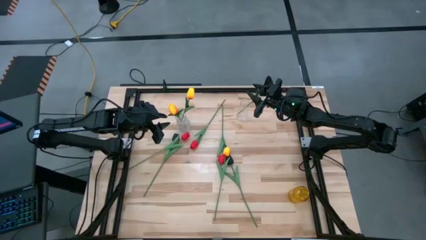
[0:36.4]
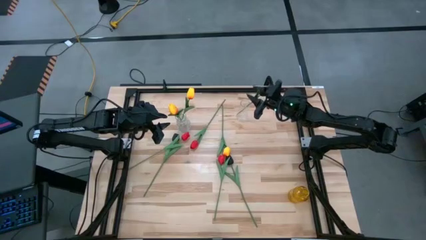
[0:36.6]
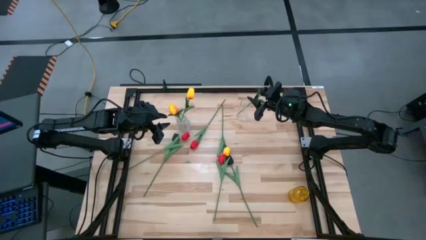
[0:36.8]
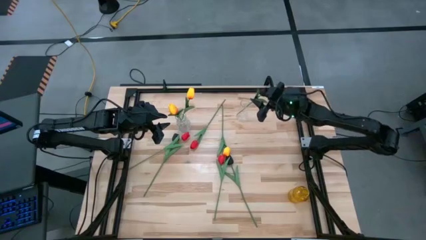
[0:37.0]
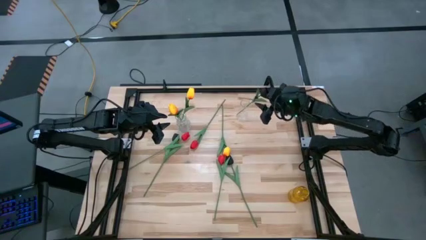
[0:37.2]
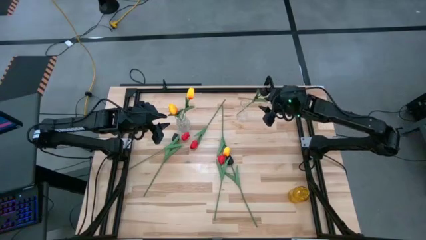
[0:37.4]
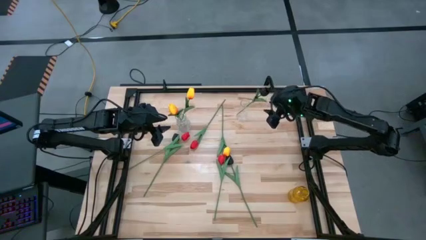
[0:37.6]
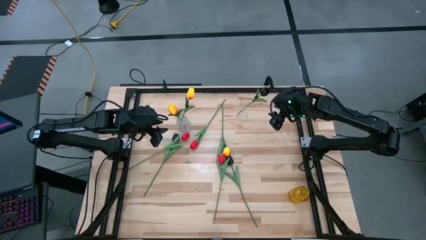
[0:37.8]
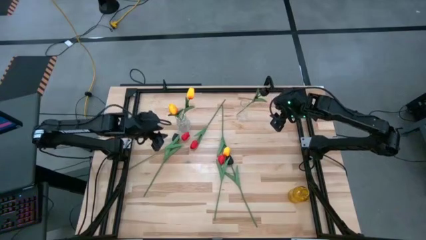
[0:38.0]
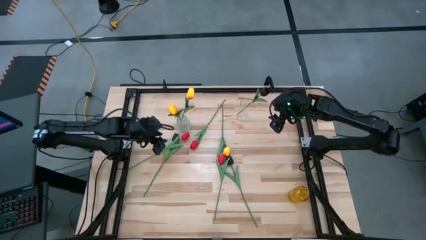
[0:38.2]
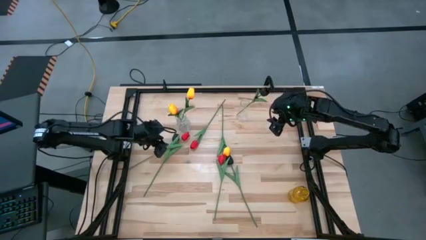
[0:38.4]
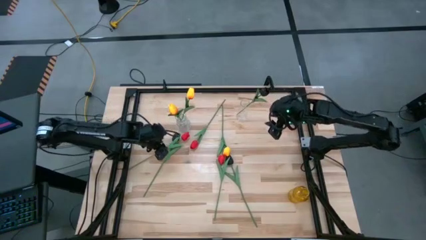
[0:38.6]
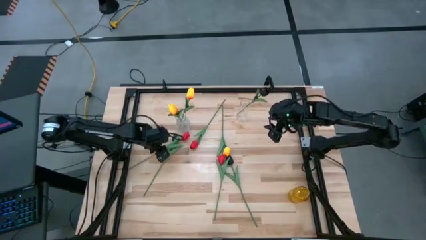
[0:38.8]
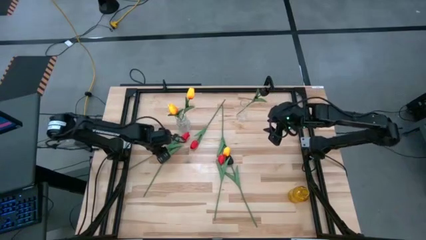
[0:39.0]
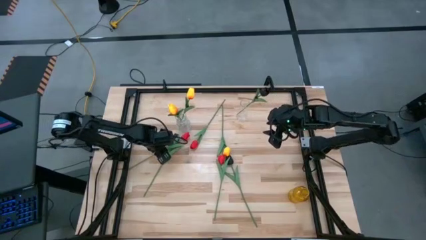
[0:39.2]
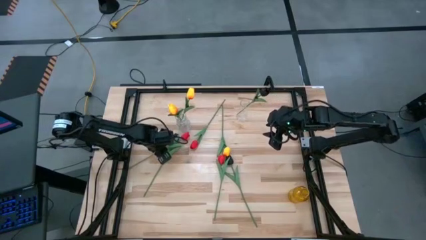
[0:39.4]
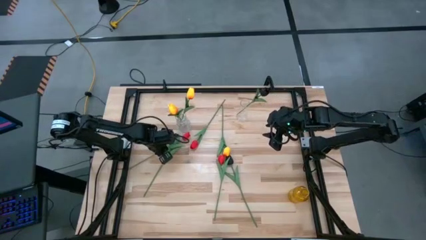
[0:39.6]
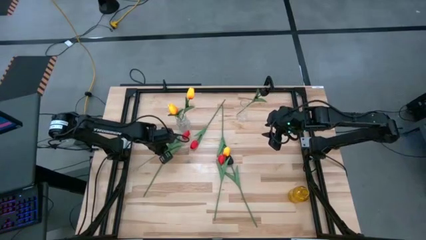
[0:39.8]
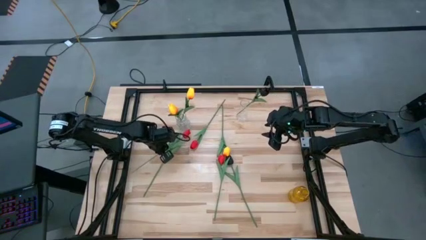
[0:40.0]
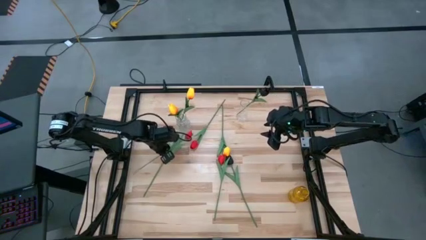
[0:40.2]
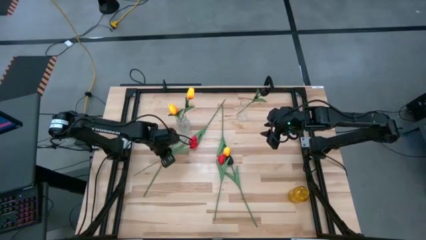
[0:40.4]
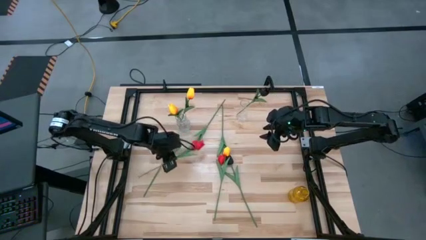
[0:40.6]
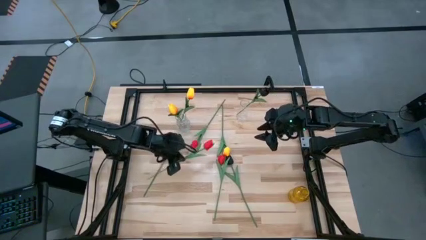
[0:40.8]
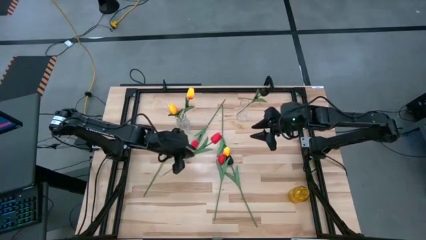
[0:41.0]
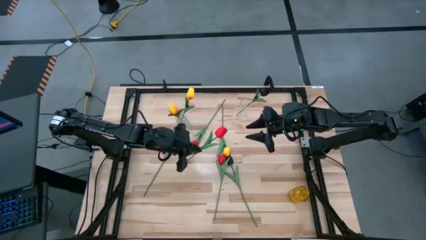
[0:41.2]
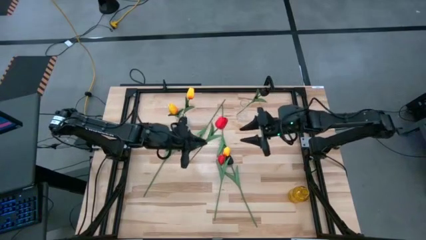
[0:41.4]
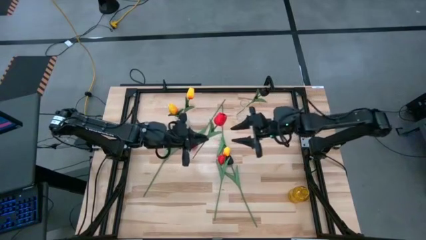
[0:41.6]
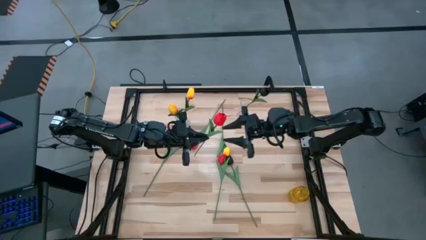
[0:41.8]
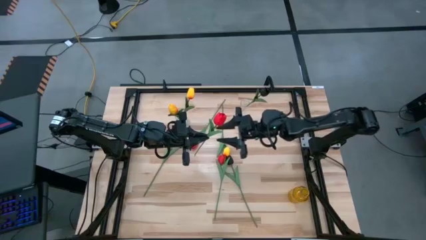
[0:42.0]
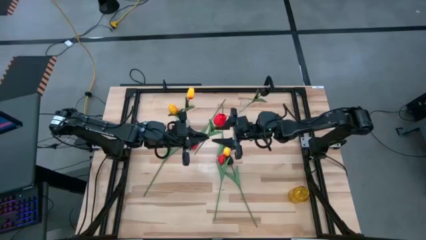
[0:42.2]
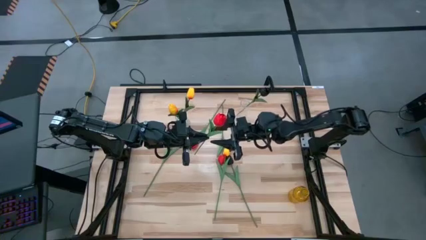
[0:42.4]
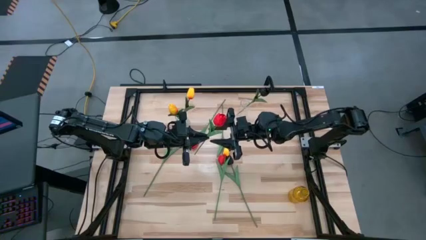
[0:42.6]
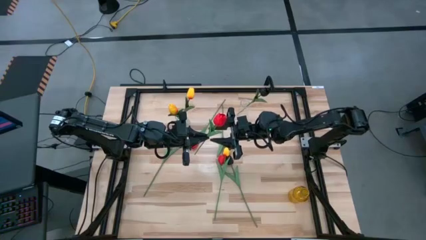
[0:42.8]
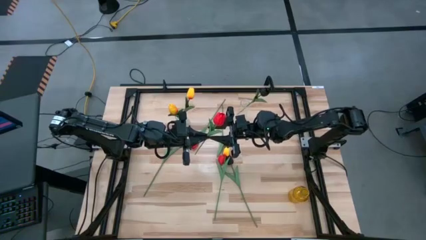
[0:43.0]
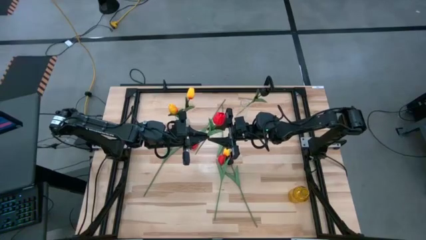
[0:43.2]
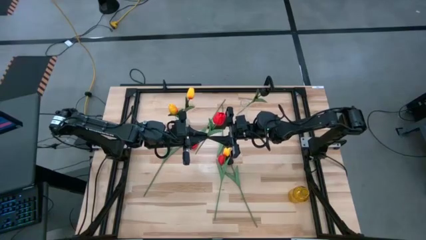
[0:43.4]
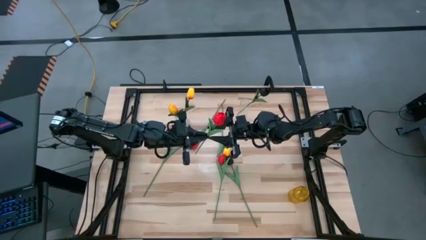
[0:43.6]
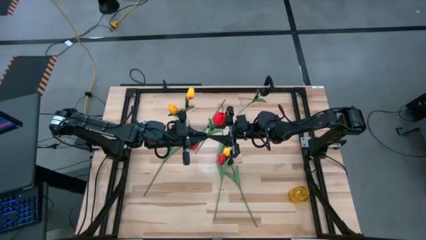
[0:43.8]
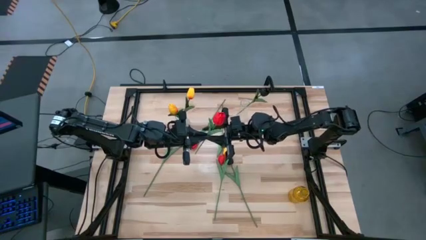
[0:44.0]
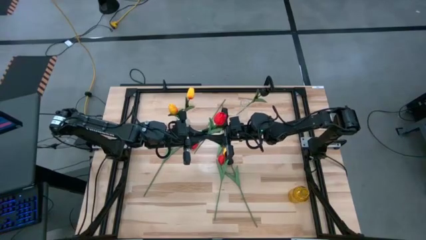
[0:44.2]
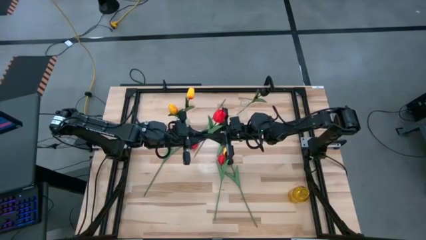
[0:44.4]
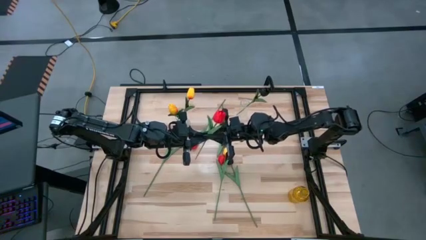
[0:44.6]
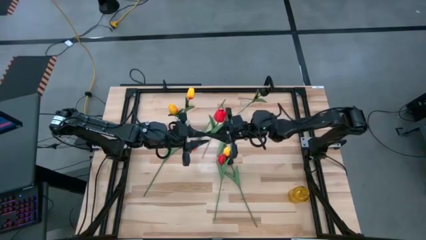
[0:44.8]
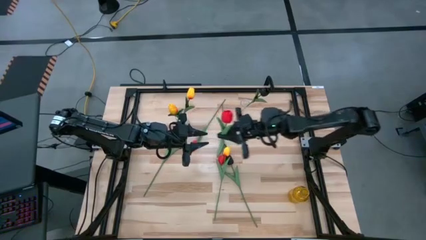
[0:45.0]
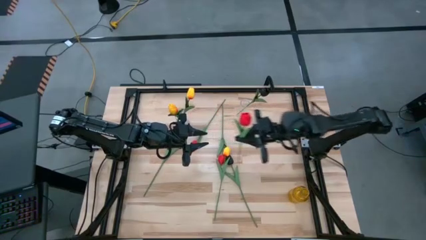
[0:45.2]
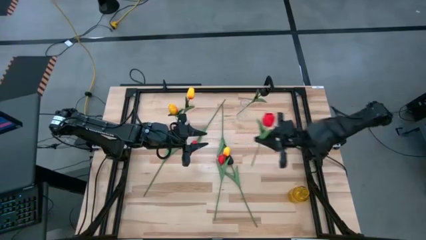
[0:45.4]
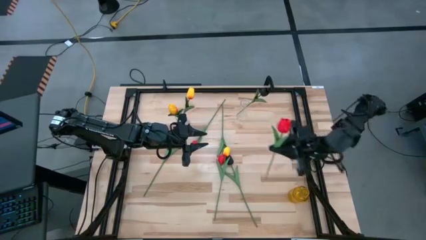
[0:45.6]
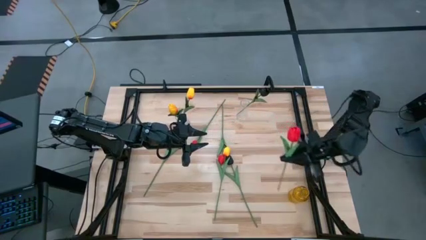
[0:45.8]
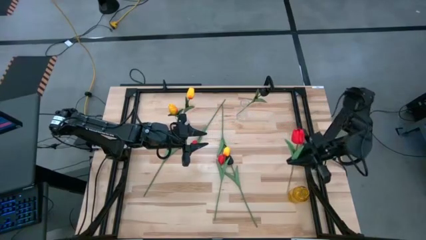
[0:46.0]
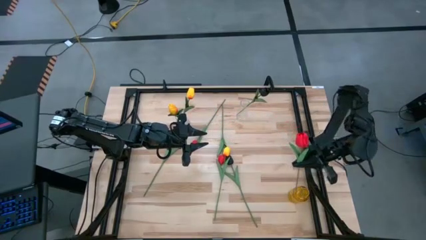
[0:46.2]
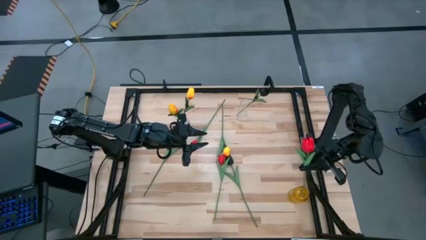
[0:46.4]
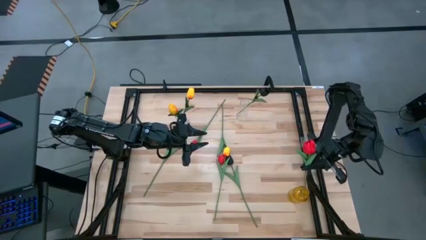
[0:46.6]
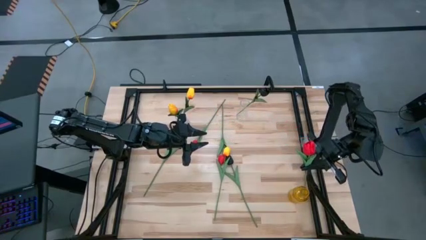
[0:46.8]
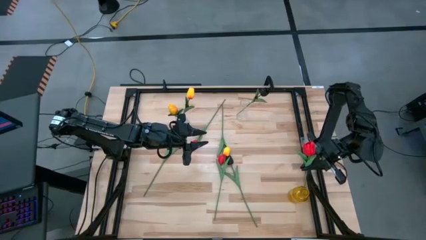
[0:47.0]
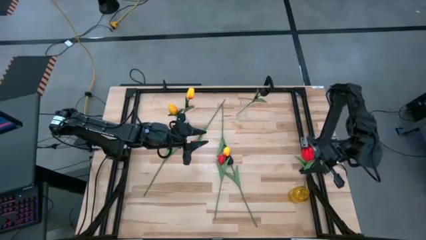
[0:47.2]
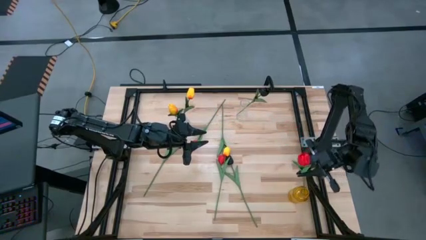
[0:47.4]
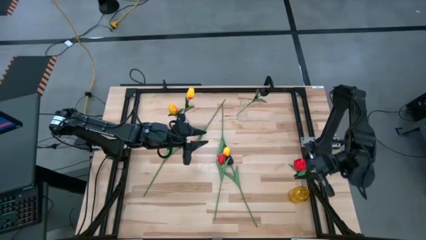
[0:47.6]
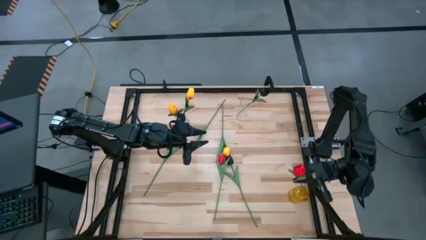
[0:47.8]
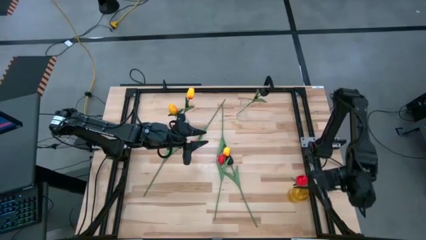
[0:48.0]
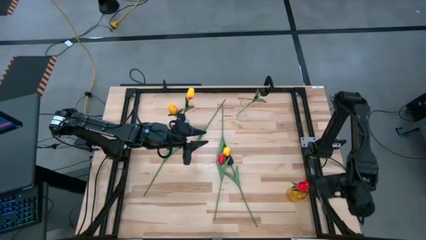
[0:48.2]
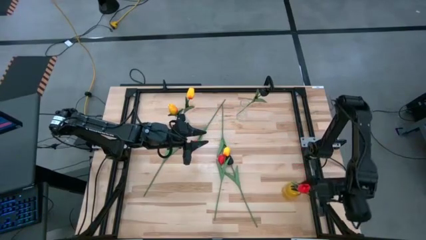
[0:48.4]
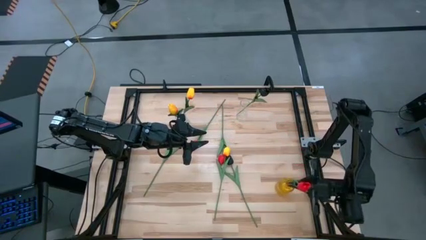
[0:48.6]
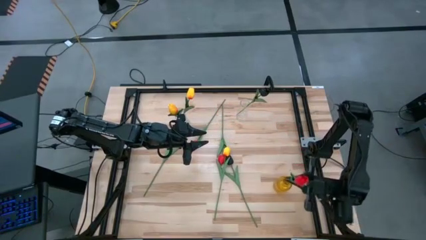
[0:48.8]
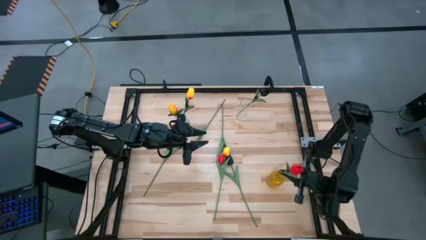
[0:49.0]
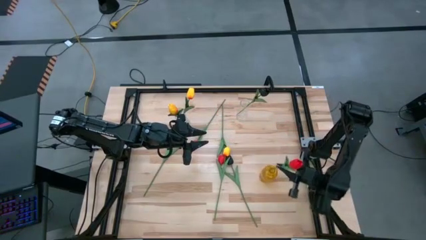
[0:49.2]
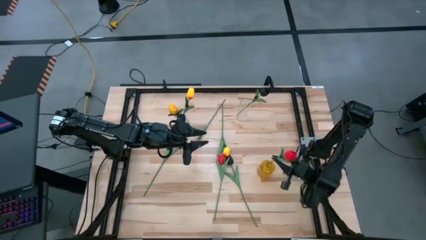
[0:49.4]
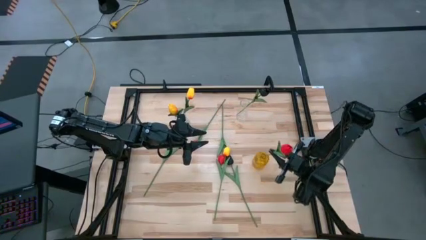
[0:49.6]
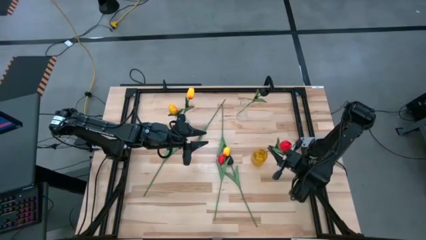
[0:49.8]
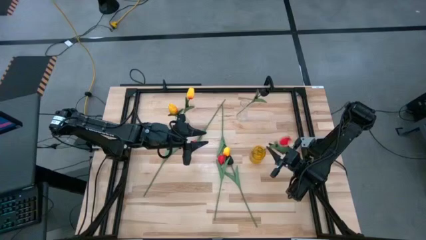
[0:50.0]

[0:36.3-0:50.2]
Task: Sort flowers into vase by color
Put the left red tulip into the yellow vase
